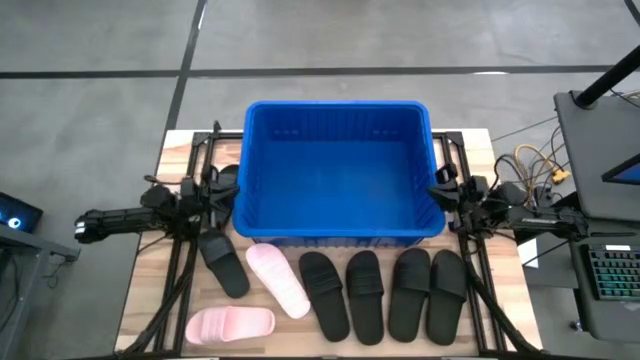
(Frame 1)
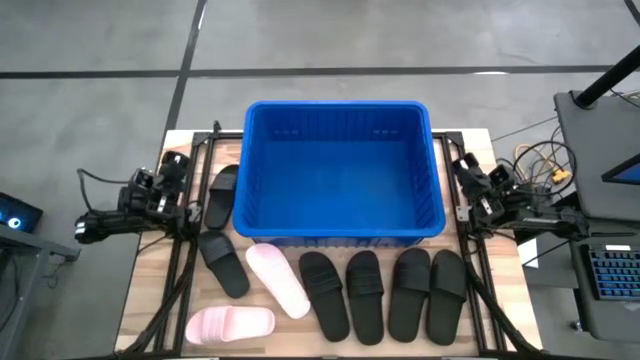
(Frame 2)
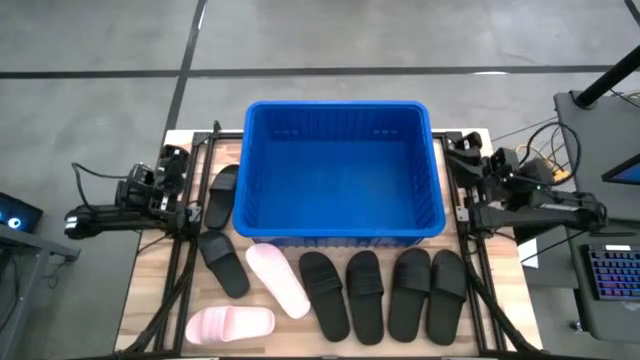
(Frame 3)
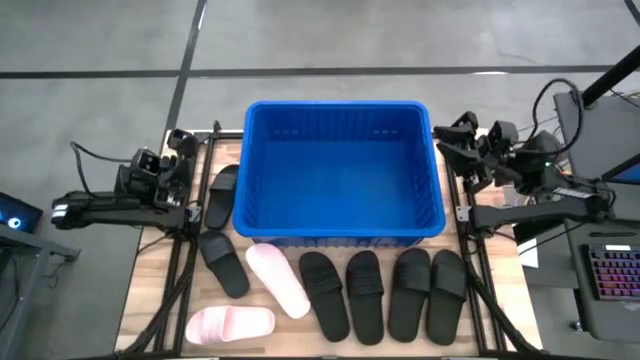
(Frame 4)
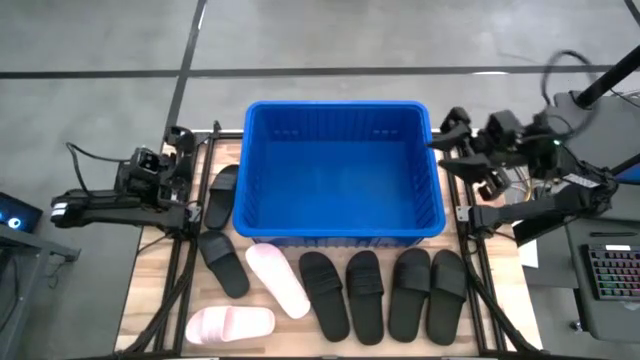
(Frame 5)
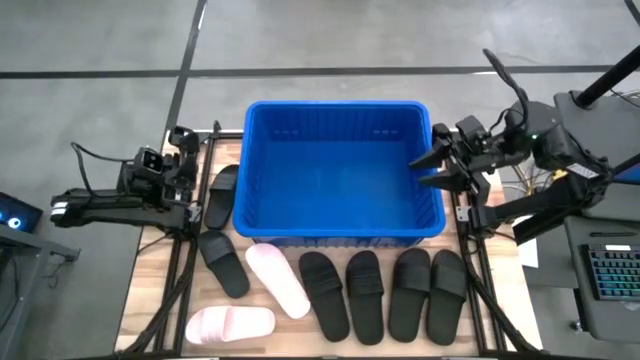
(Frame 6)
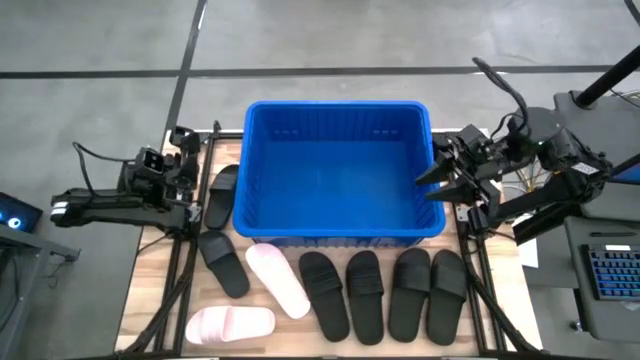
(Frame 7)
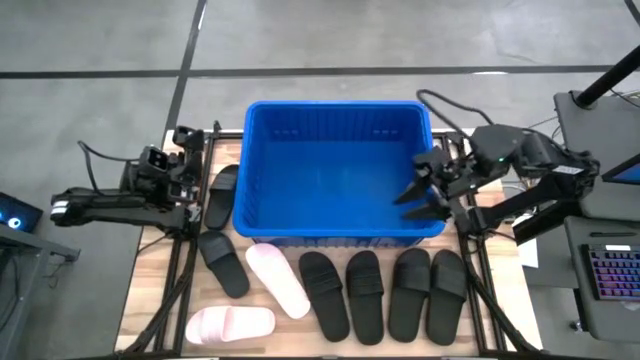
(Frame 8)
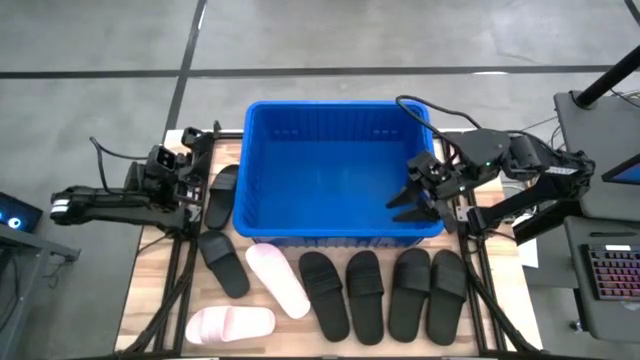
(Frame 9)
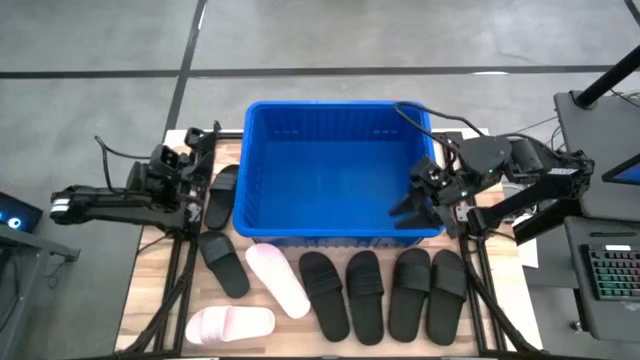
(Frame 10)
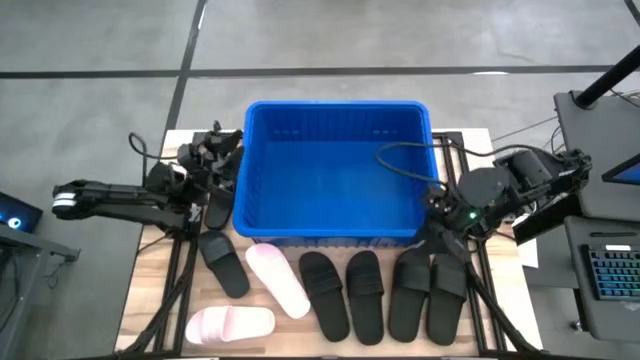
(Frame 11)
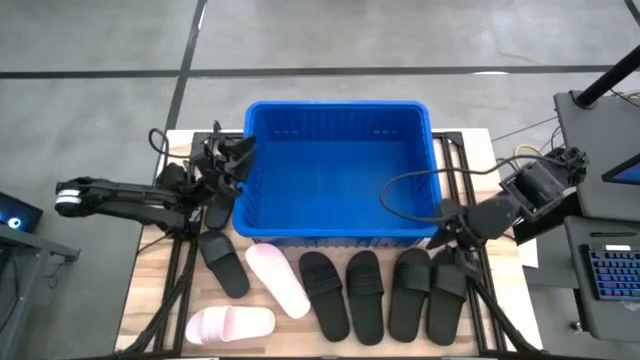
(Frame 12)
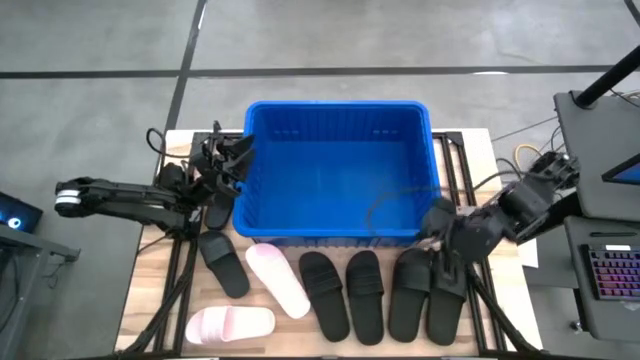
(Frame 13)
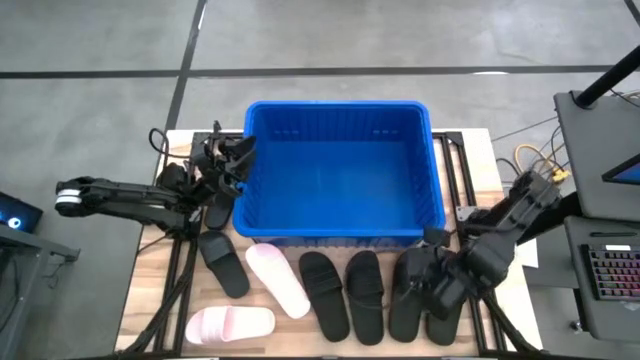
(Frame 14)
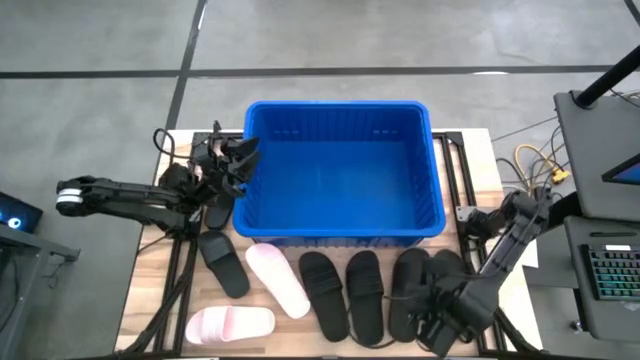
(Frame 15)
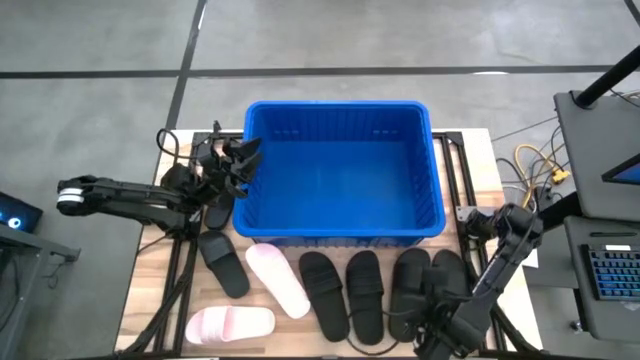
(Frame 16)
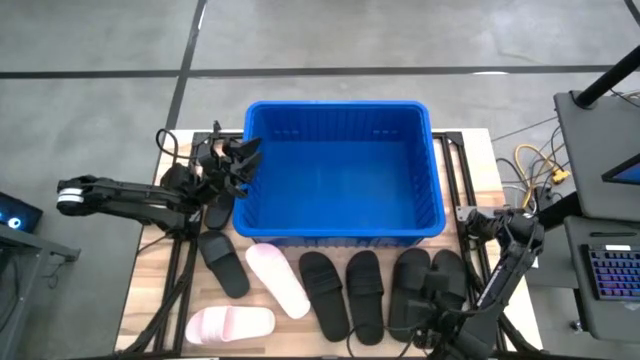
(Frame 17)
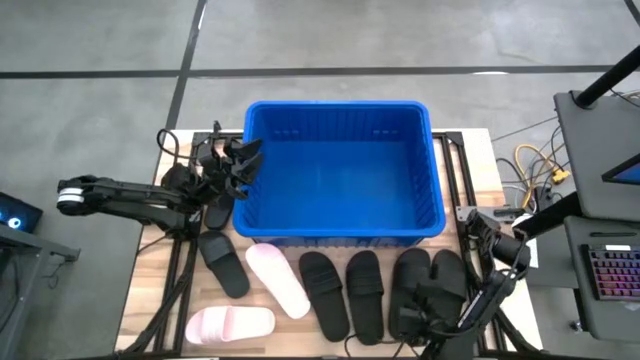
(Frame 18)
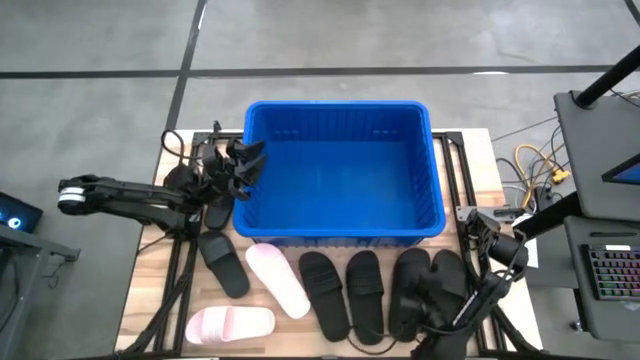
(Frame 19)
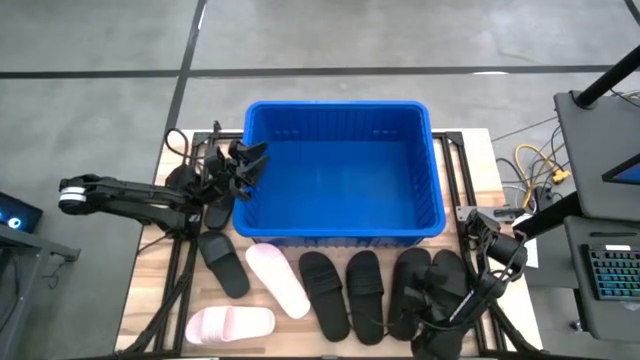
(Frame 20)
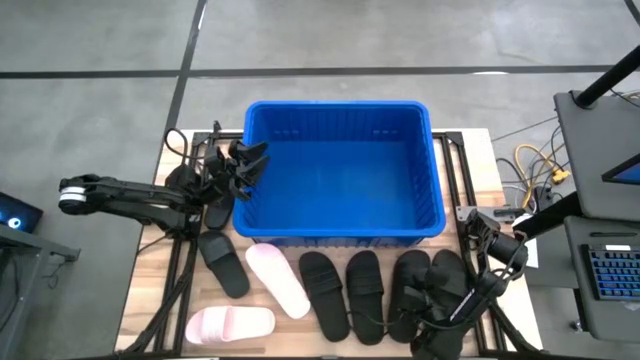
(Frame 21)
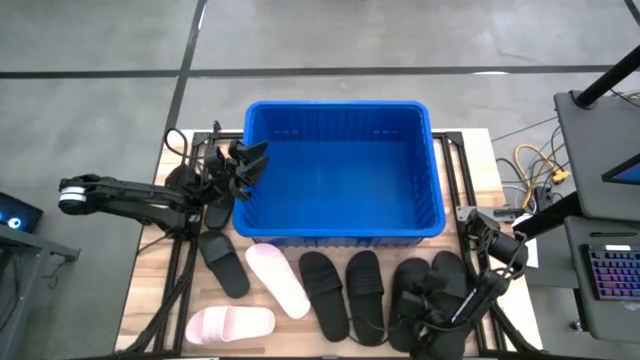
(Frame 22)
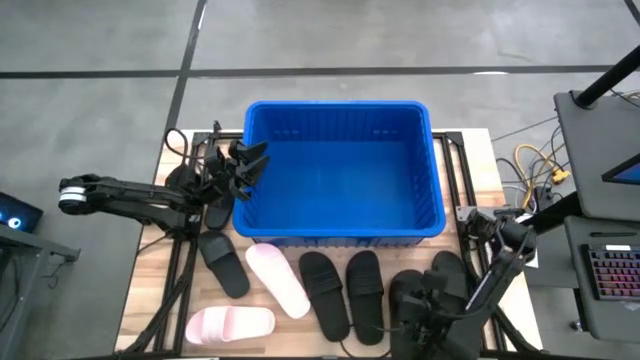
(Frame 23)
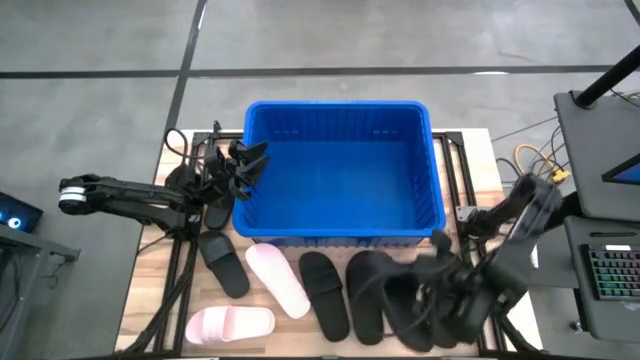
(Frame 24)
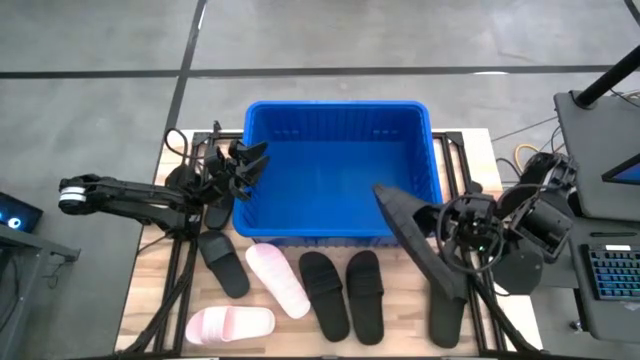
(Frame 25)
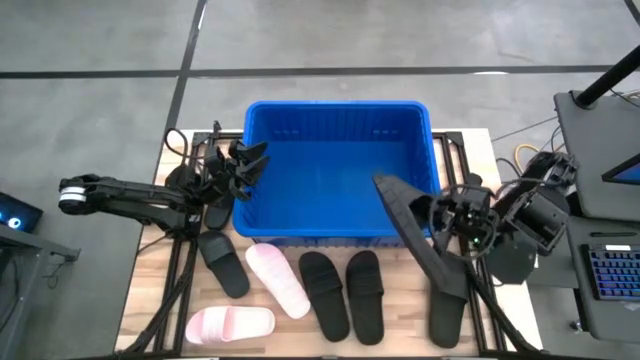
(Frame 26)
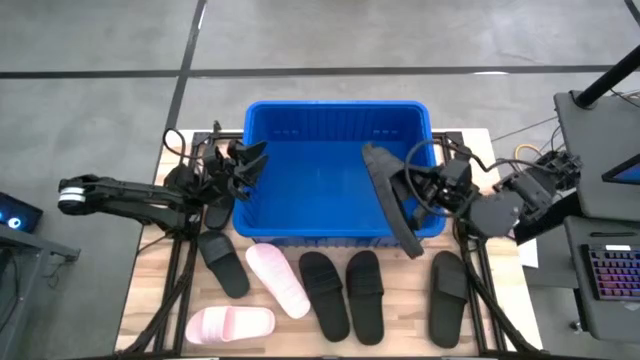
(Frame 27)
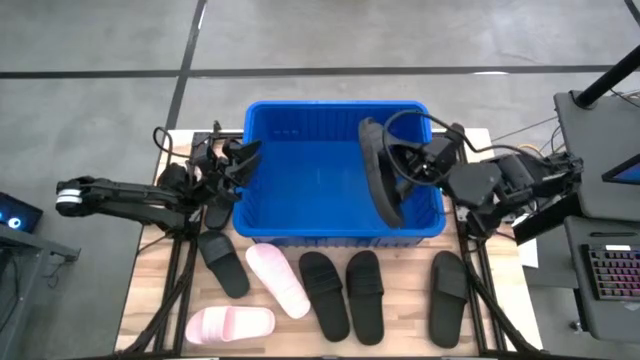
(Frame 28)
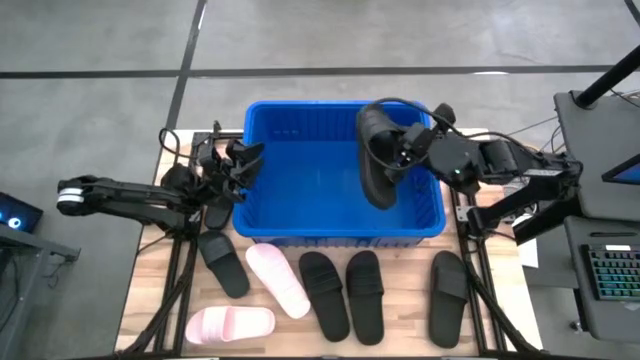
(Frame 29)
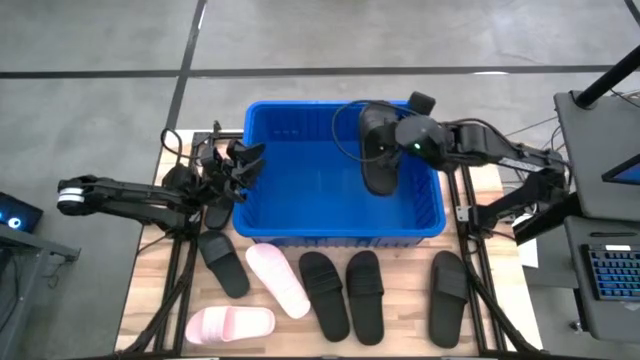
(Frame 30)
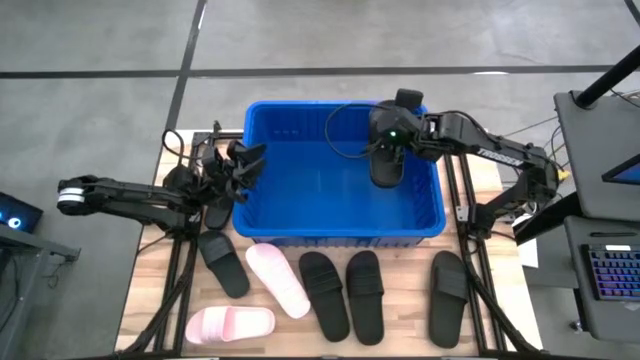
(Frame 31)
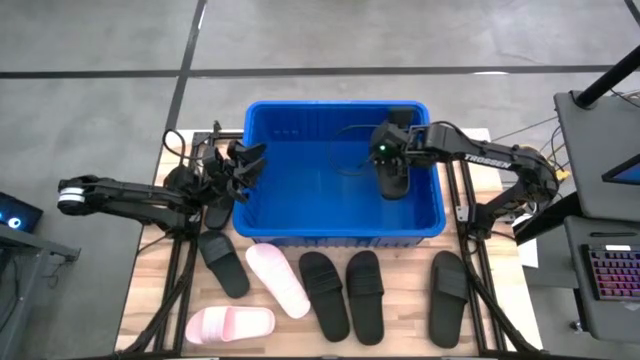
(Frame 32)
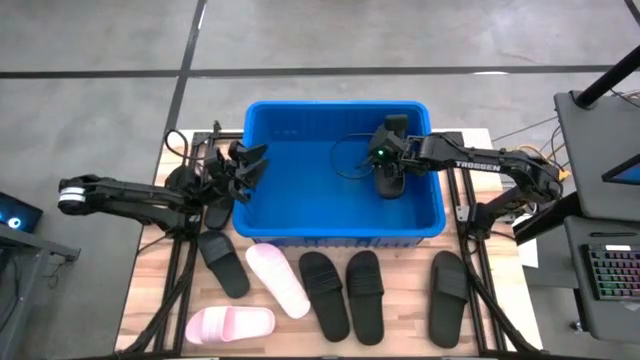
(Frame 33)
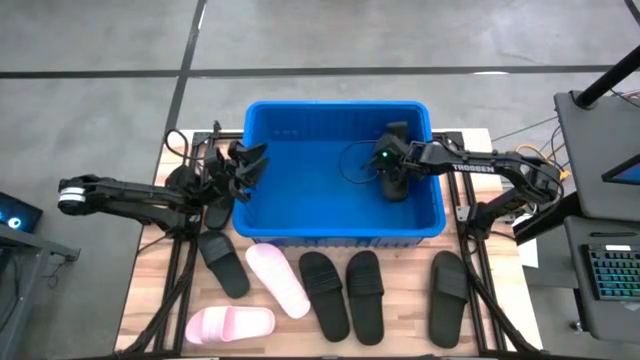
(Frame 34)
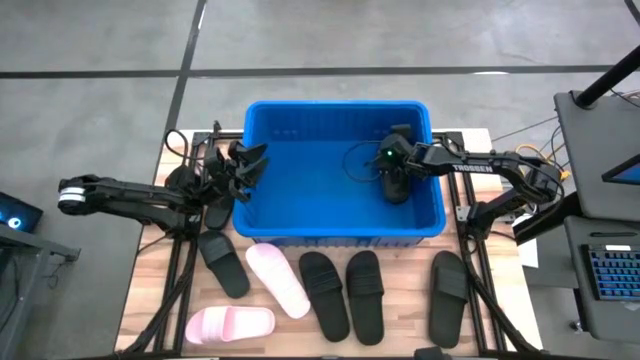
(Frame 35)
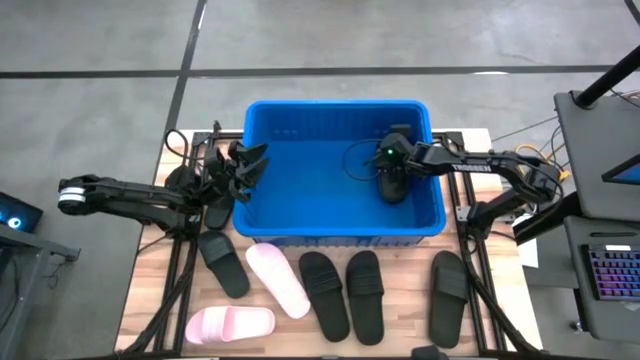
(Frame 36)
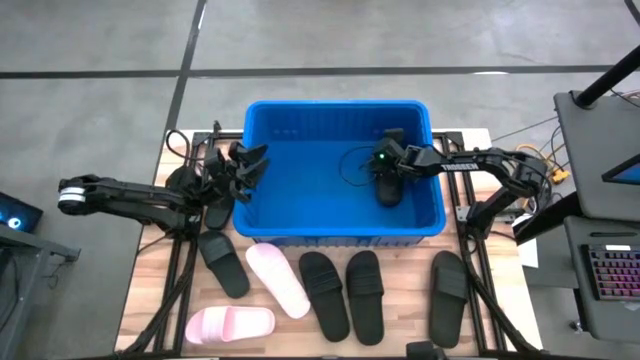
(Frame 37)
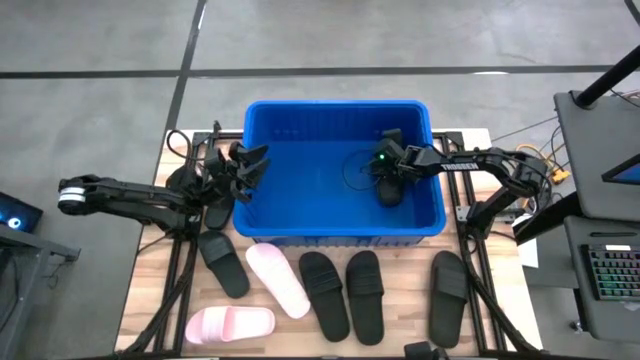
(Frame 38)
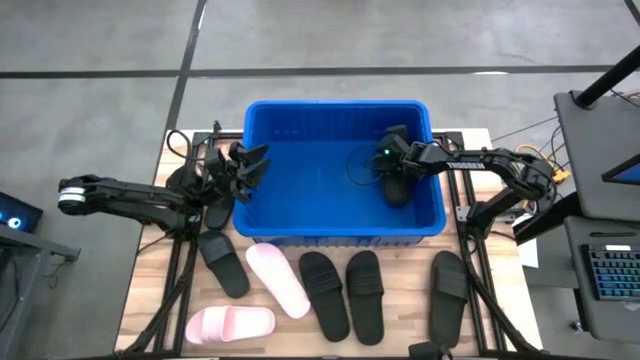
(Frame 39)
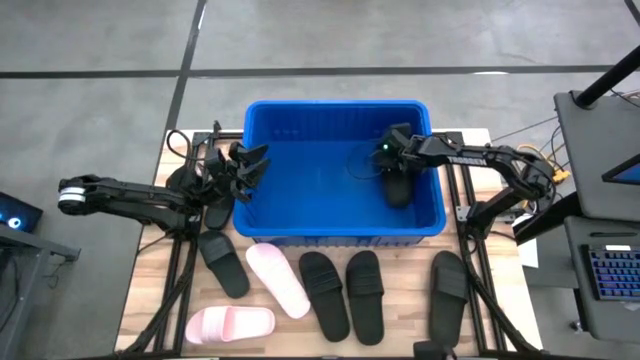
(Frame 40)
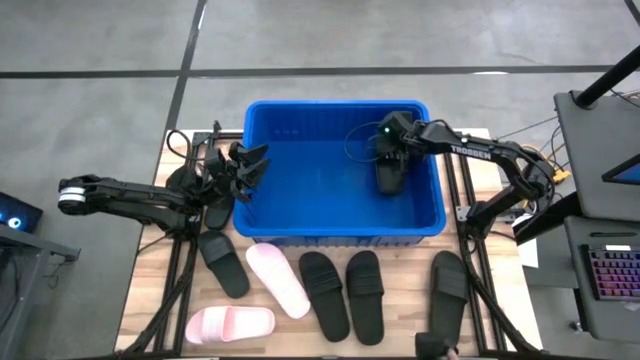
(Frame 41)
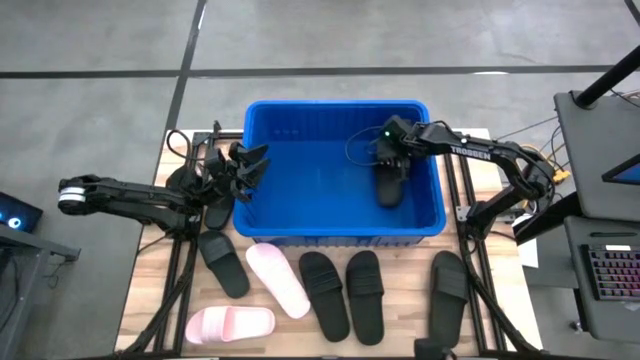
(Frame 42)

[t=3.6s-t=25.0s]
Task: Pick and place slides into bin
Put the black slide into the blue bin
